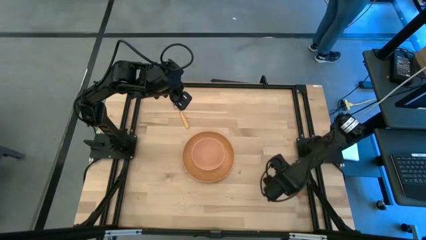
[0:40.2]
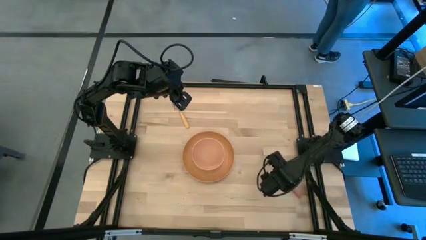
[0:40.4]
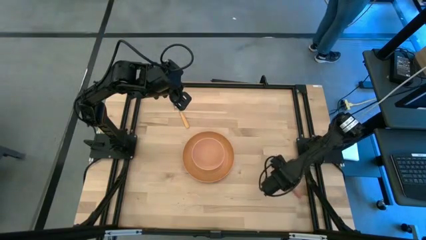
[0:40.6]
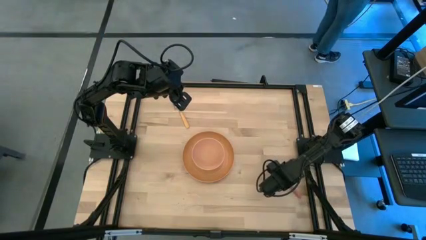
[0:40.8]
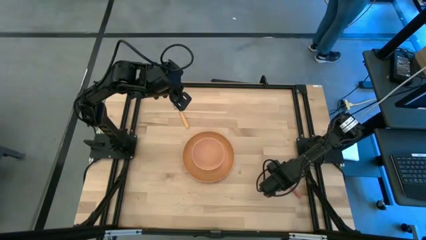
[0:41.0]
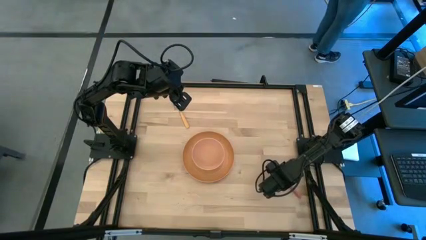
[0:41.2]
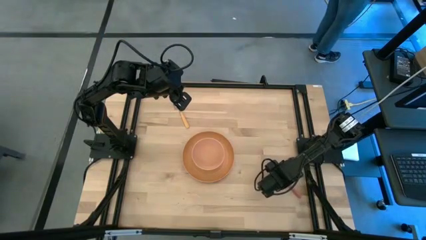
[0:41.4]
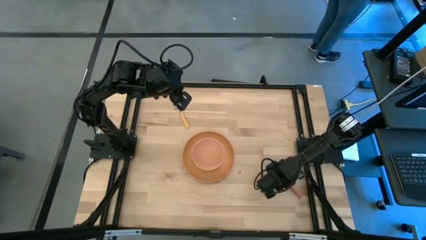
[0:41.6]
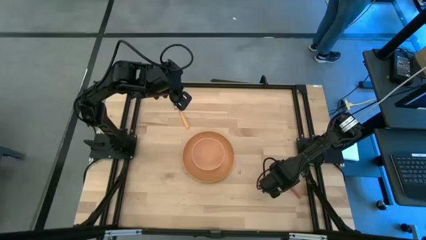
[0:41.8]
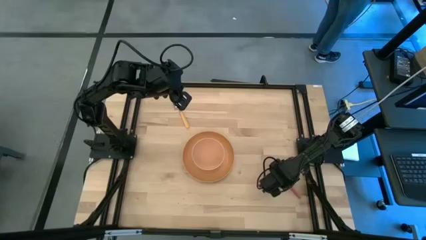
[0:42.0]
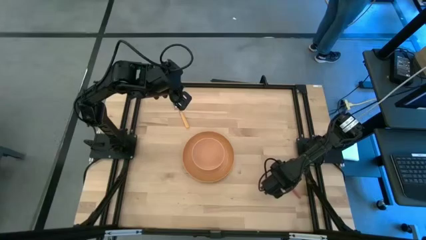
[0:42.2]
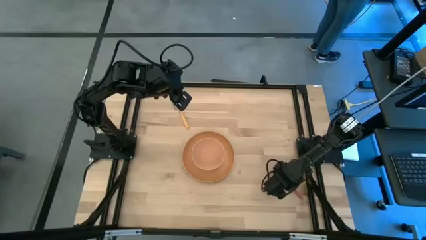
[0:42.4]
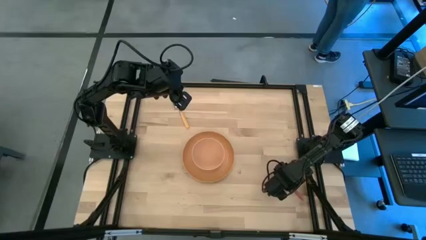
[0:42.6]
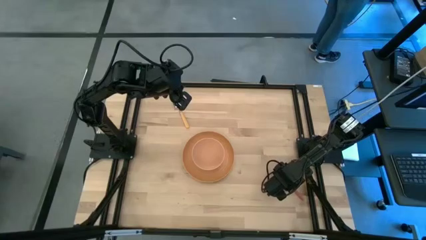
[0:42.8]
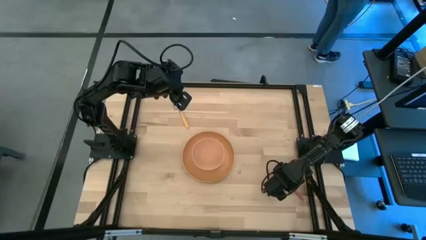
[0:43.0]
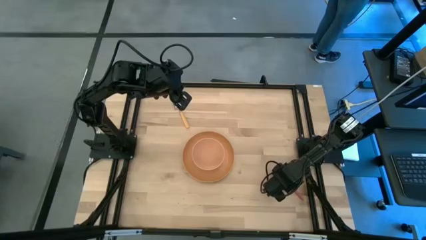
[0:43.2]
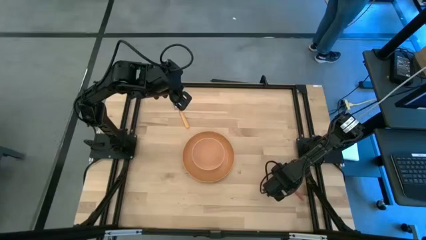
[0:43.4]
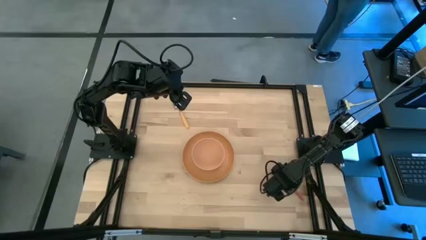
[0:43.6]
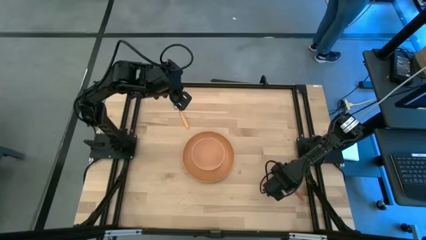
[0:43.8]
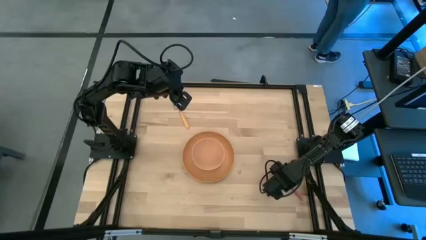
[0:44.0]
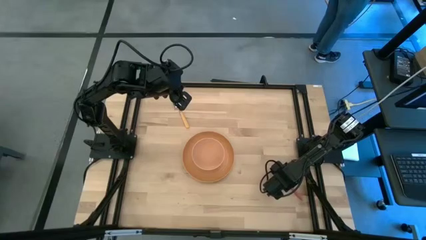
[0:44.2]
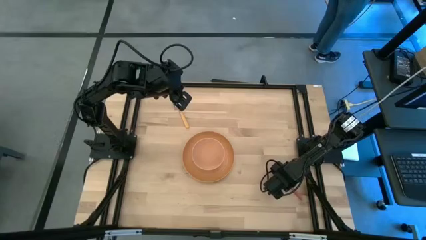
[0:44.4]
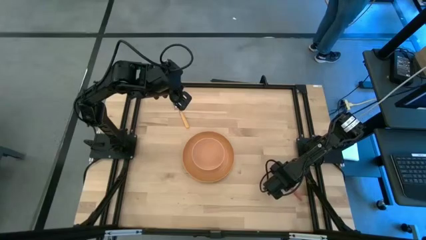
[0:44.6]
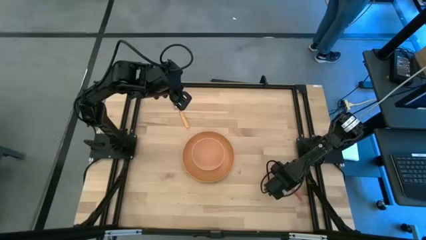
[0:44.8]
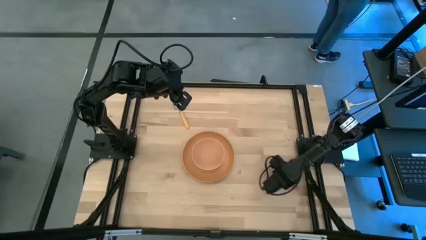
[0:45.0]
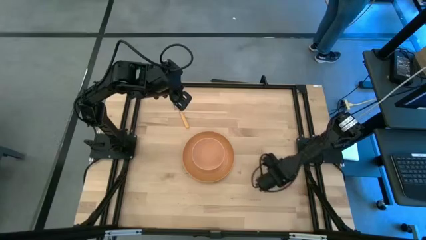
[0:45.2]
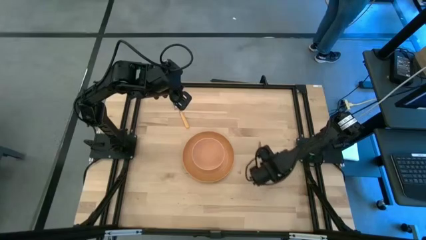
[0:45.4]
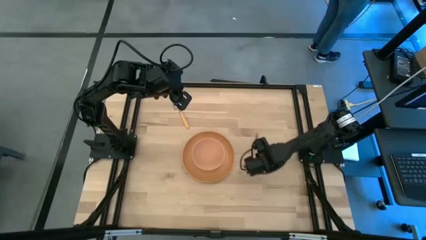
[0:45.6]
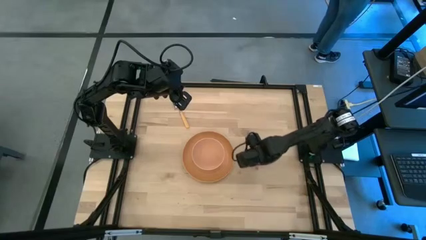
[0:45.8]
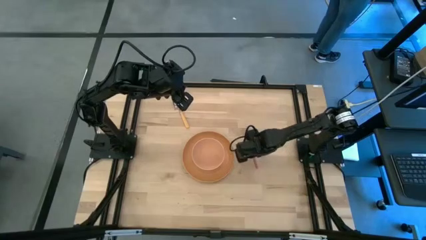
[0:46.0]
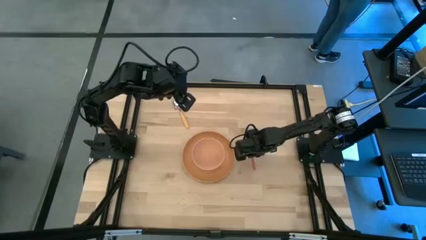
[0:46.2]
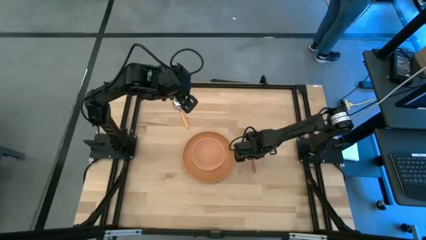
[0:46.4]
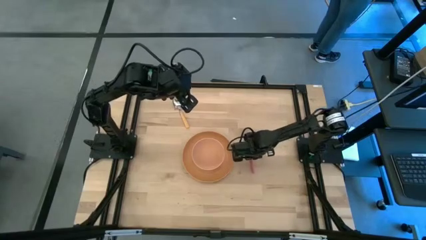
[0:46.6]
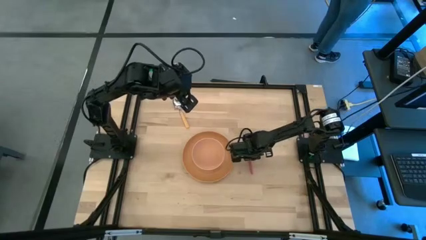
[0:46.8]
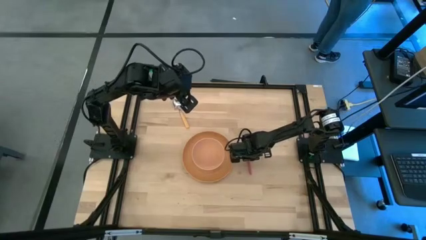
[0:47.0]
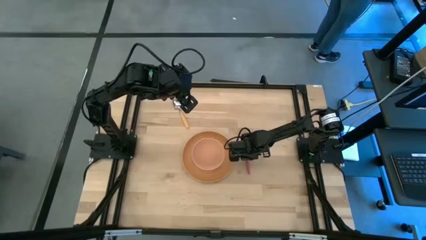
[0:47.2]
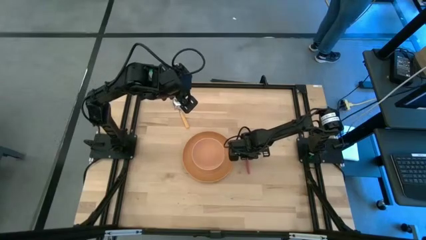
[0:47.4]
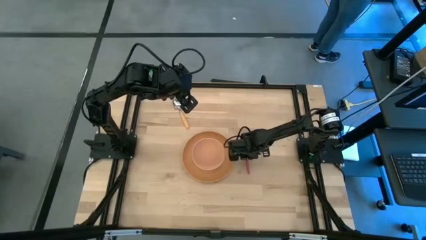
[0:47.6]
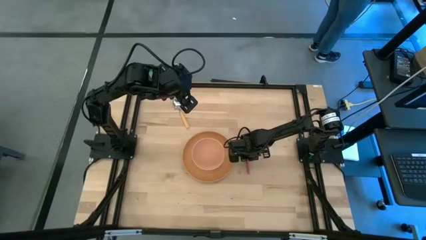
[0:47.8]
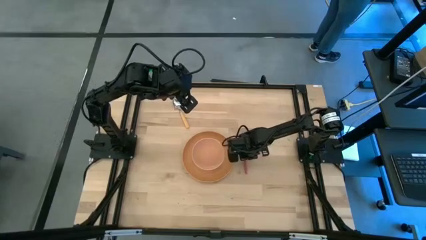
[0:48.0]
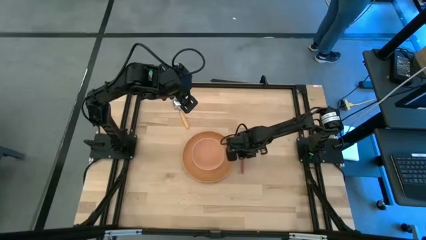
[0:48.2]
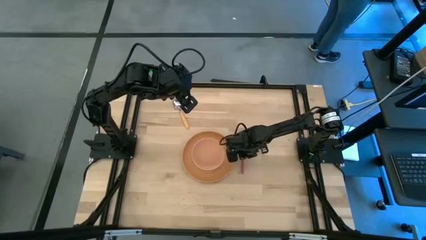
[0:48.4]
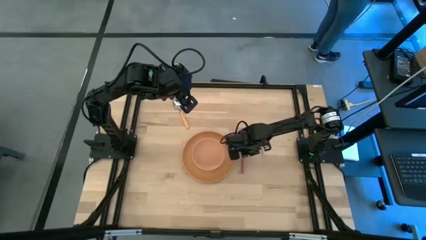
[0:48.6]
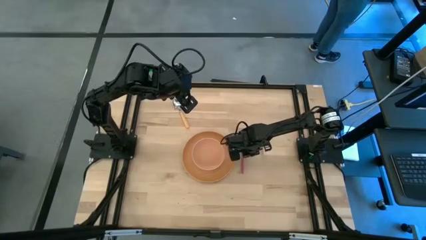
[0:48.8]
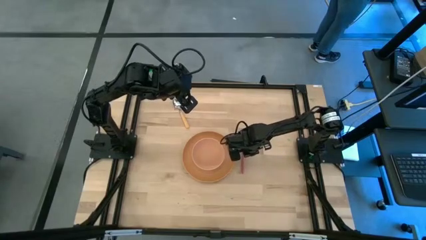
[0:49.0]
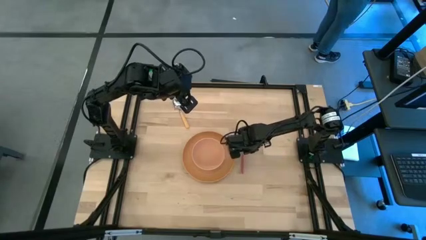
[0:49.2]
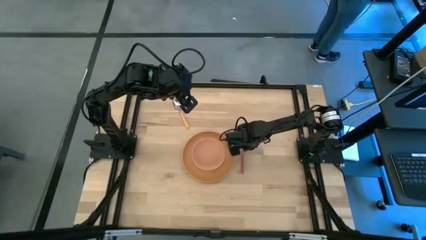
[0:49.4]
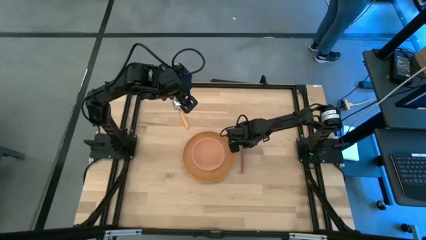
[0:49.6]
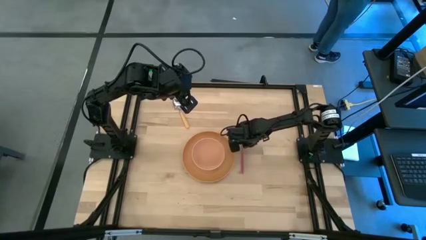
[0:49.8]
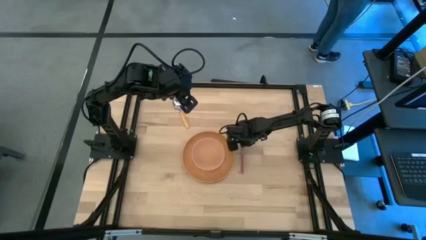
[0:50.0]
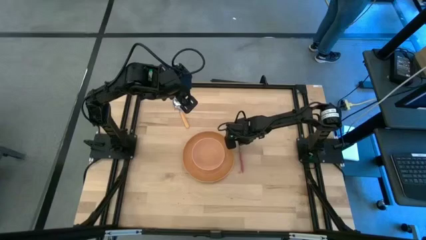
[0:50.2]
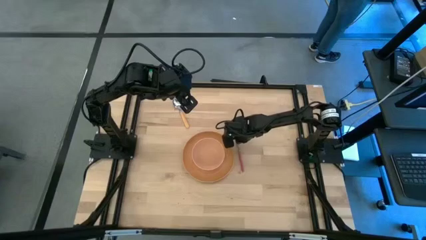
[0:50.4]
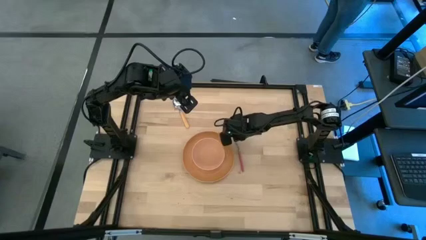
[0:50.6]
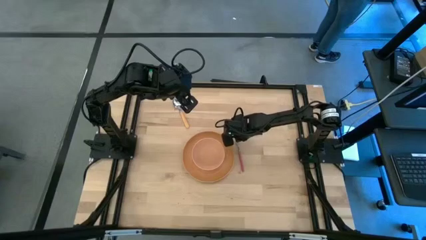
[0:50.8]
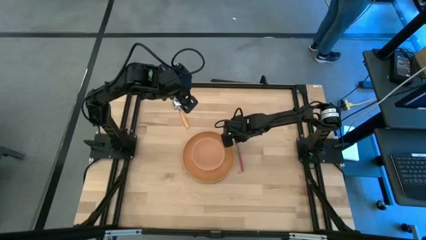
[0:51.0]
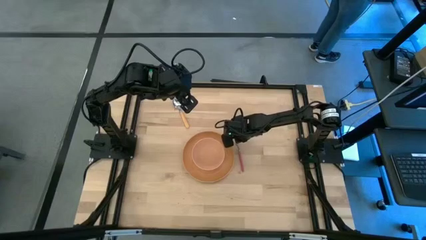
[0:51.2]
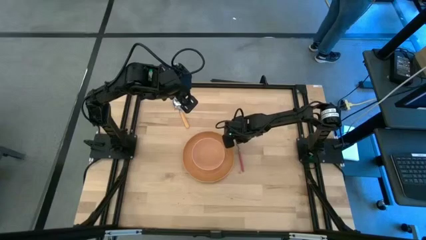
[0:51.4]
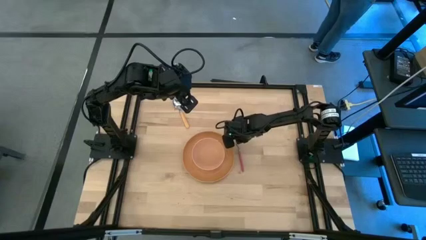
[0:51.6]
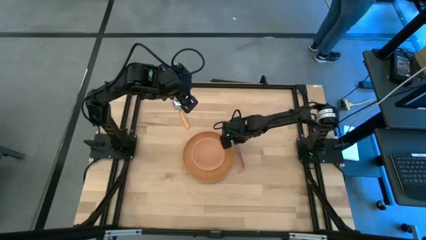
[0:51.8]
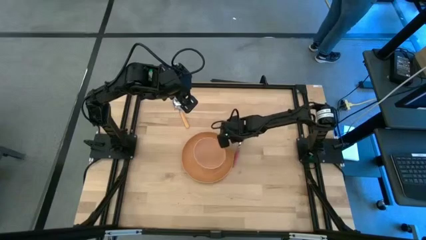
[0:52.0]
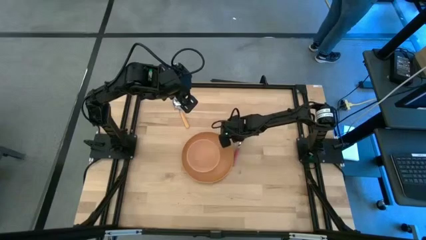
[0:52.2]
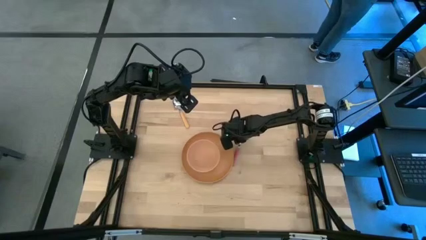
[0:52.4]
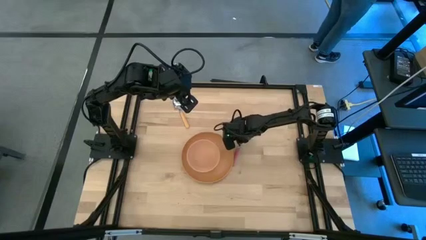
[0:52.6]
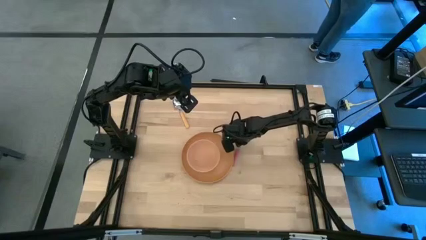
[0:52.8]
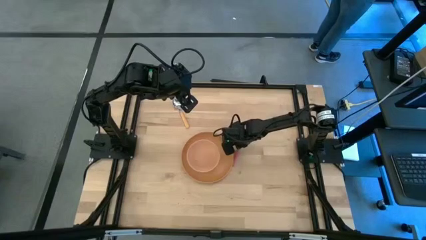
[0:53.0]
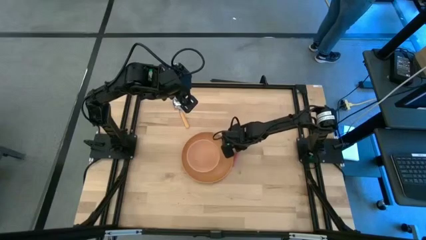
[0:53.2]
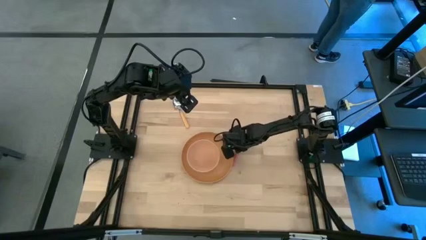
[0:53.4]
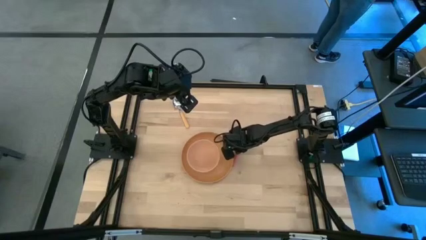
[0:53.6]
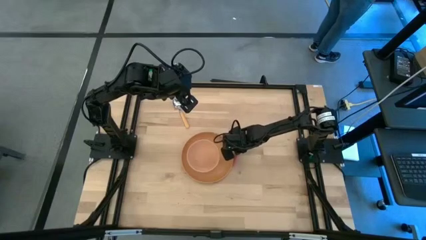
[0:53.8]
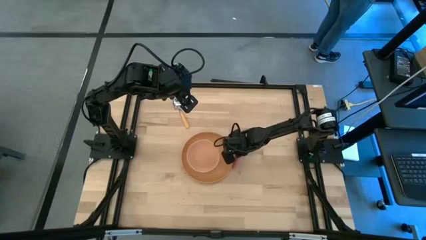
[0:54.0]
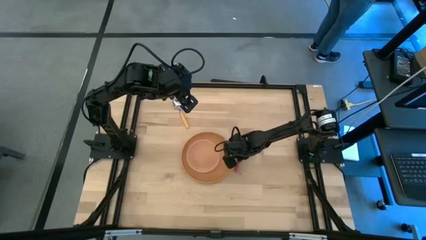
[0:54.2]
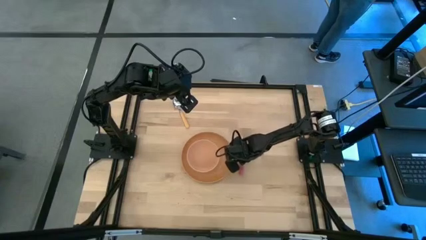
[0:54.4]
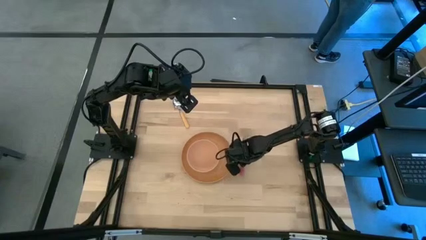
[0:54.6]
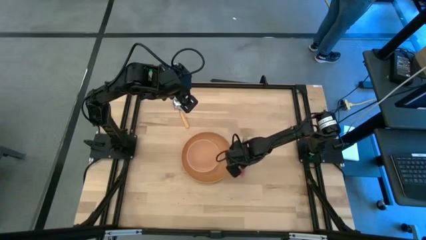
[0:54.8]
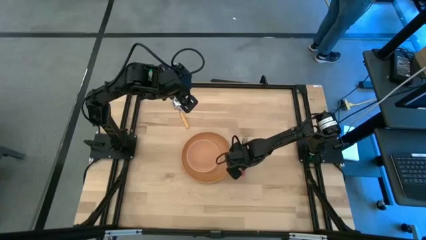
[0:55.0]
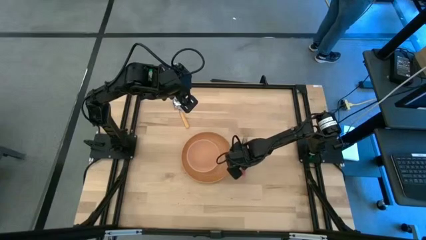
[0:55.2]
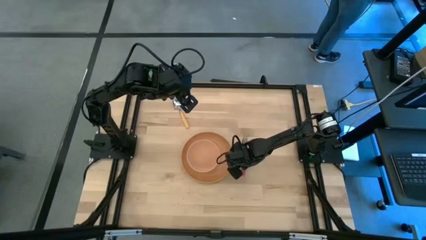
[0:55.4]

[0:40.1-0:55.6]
Task: Set table place
Put the pink fork to the right of the orange plate
